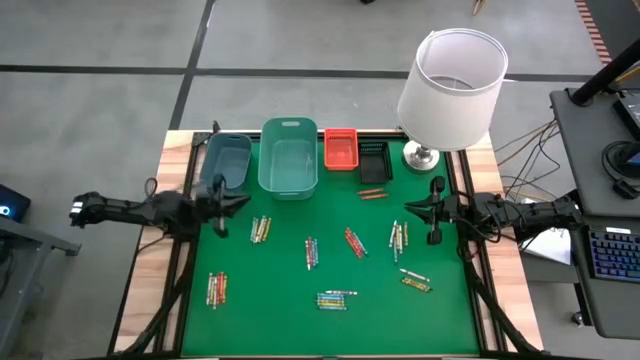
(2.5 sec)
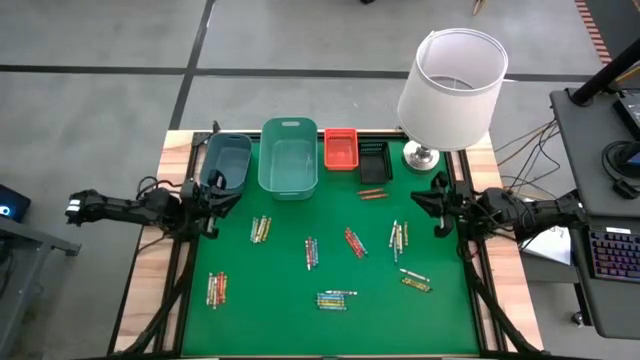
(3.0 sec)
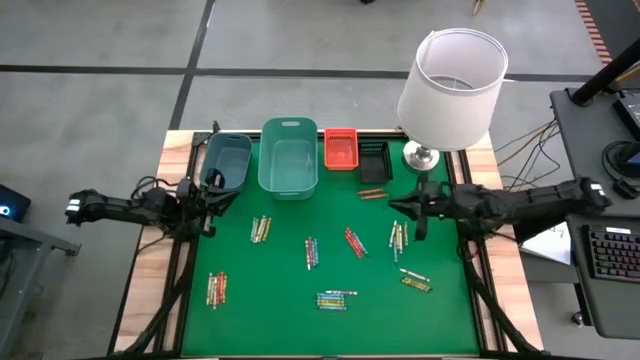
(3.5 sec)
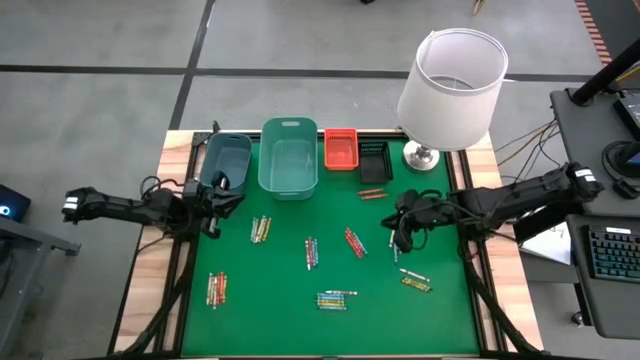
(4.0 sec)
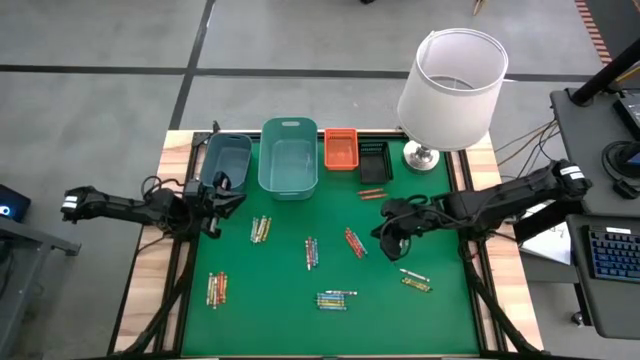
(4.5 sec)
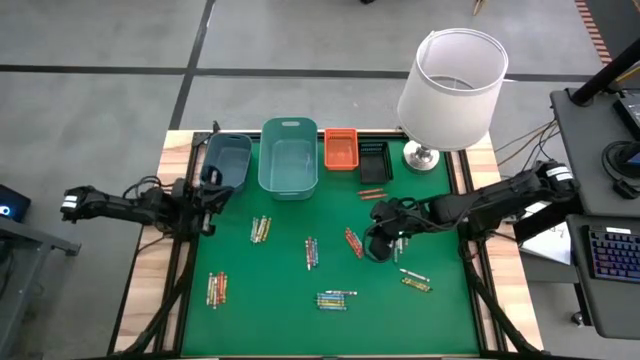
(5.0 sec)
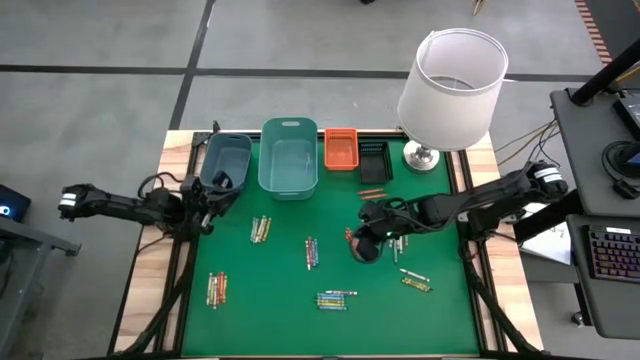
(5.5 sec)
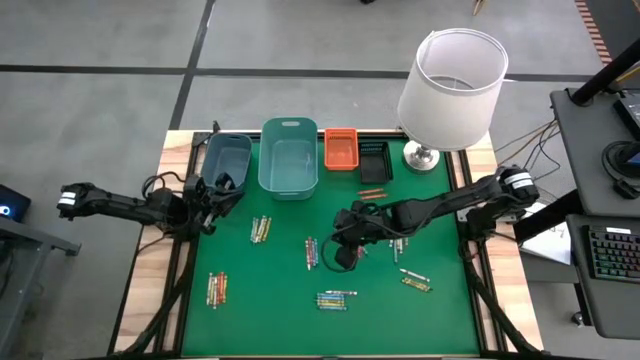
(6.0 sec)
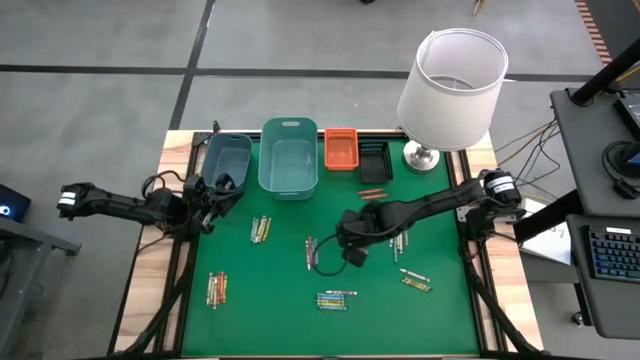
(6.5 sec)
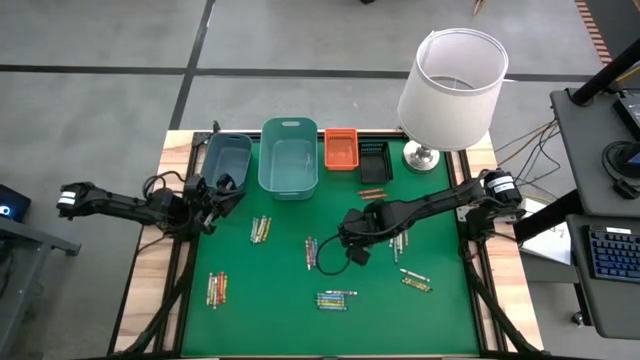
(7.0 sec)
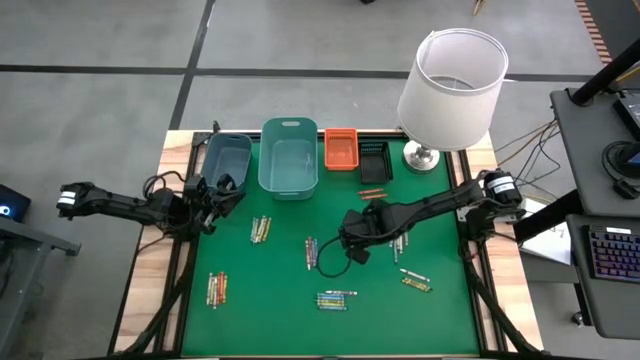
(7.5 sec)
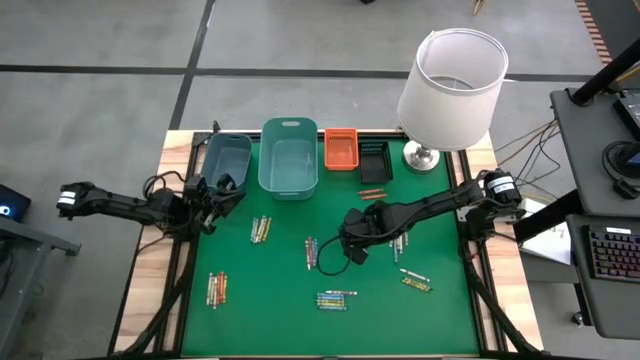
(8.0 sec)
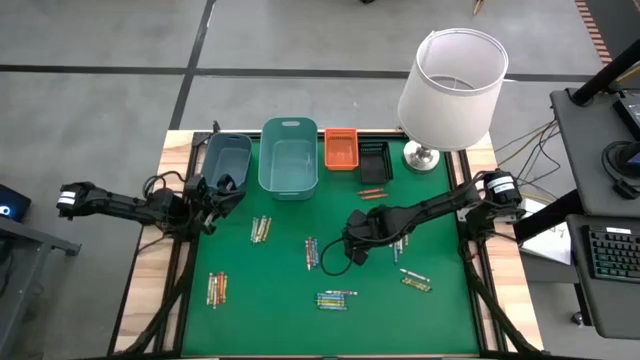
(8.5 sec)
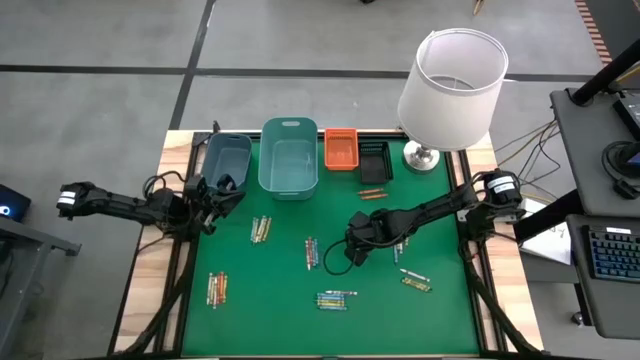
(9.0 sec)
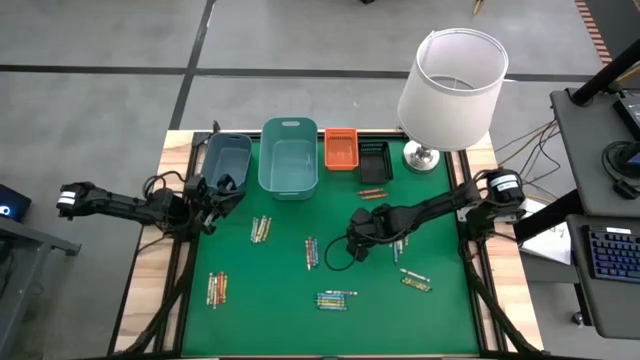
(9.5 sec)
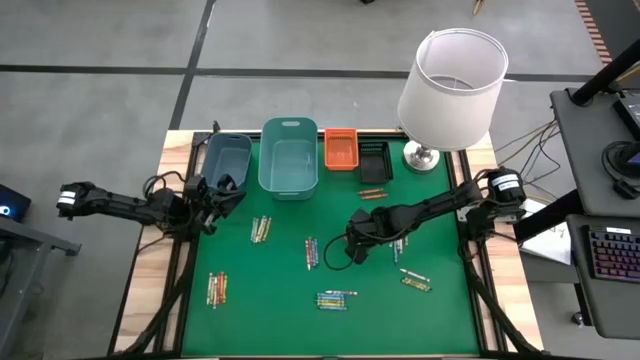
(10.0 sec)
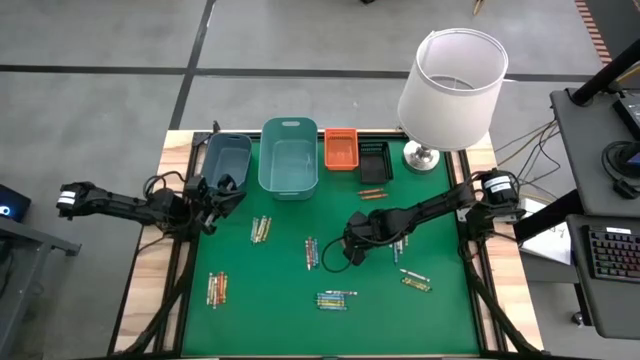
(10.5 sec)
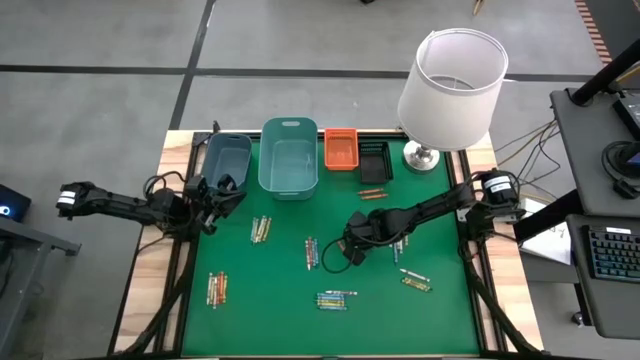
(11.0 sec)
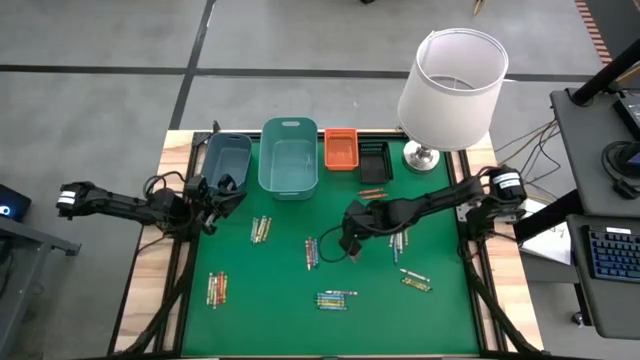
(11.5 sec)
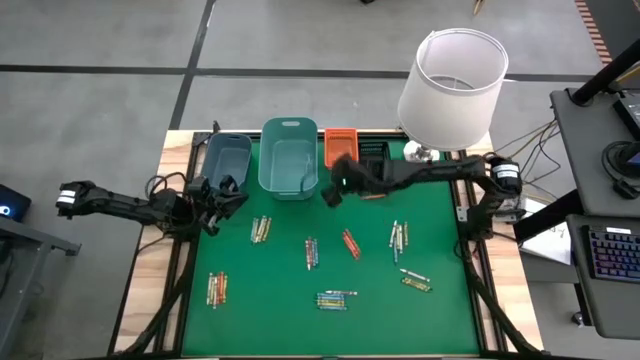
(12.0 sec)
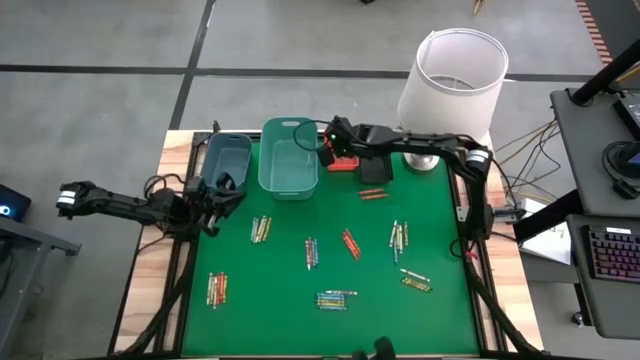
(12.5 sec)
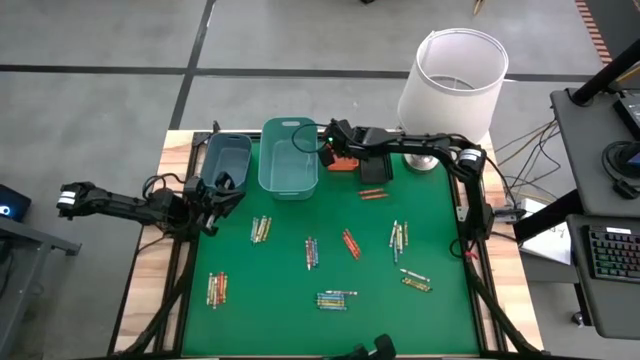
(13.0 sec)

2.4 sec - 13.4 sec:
Task: Sort crayons
Put the blue crayon into the orange bin

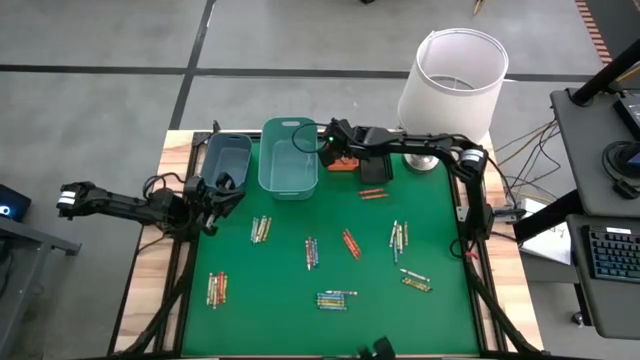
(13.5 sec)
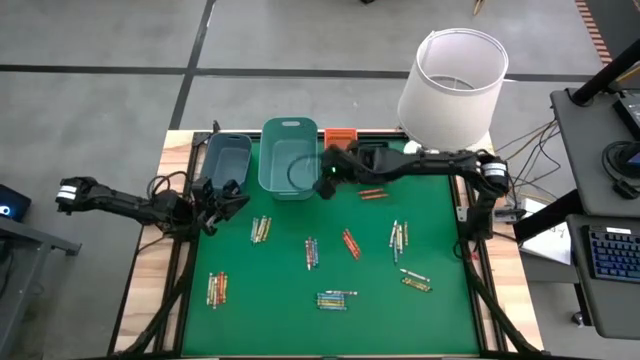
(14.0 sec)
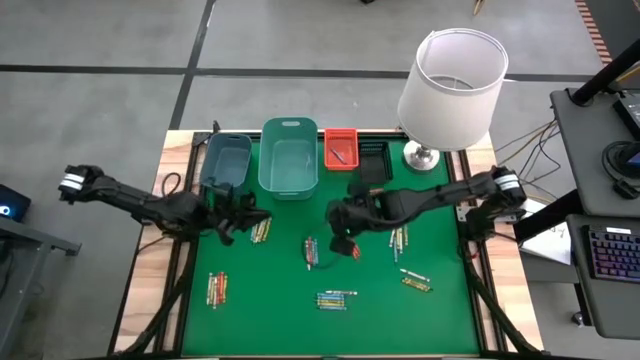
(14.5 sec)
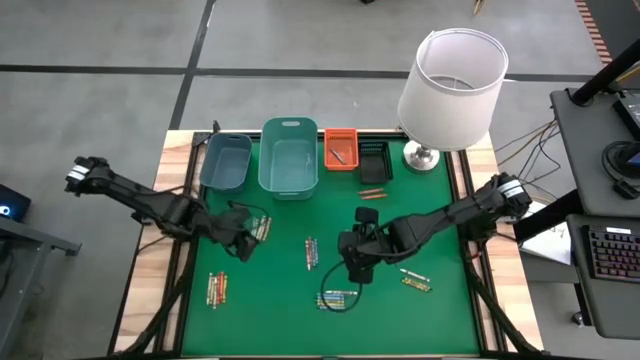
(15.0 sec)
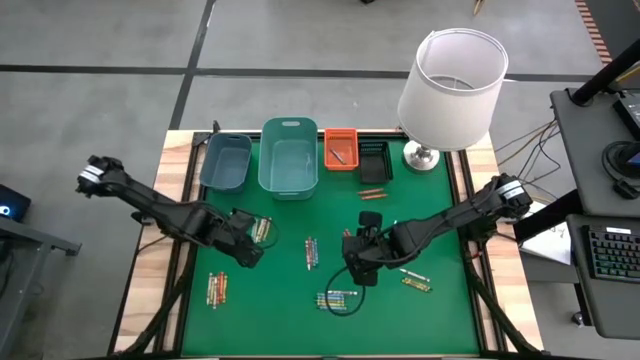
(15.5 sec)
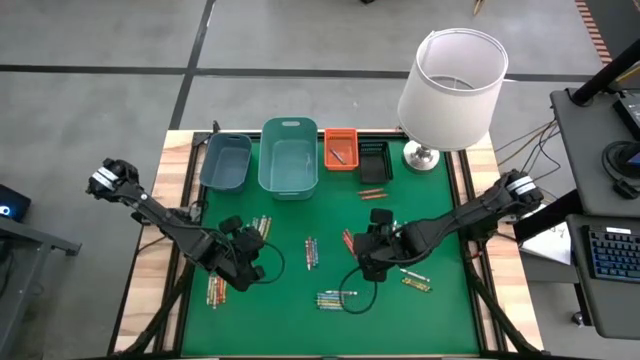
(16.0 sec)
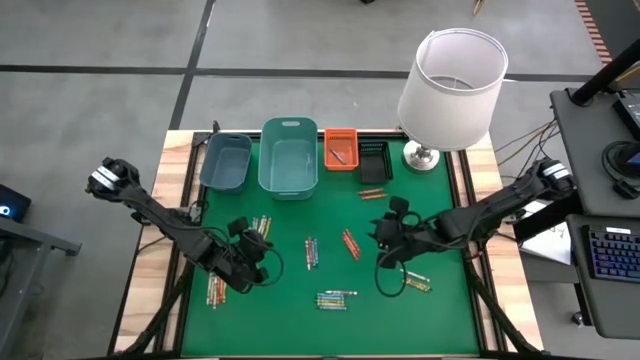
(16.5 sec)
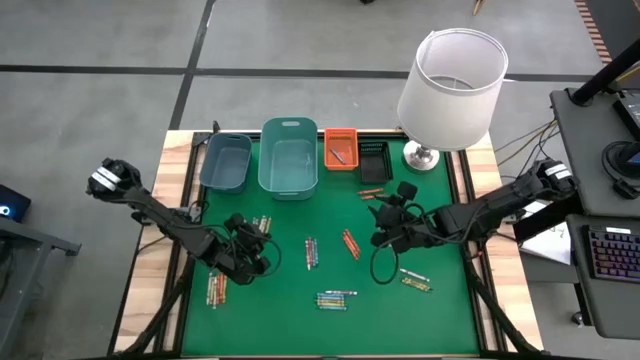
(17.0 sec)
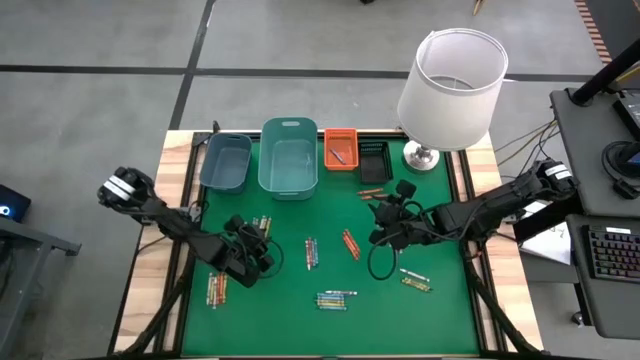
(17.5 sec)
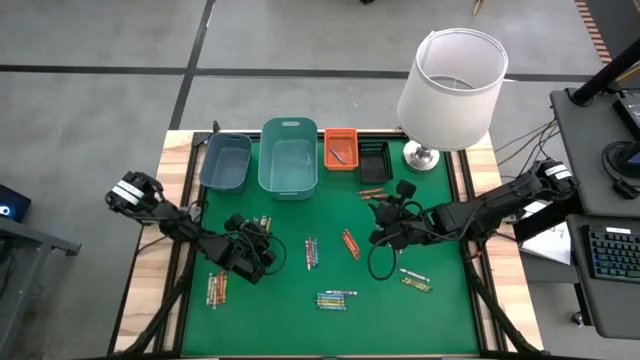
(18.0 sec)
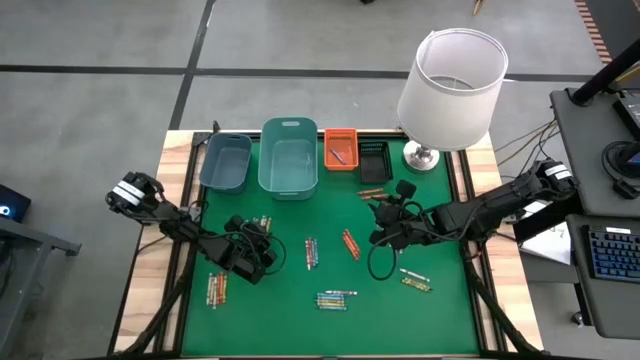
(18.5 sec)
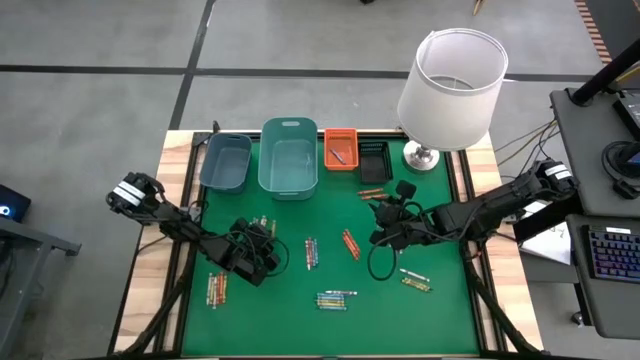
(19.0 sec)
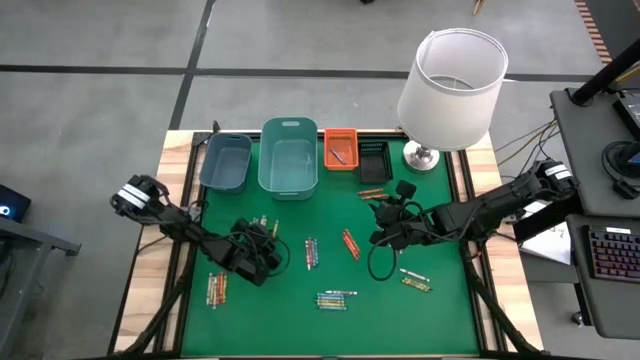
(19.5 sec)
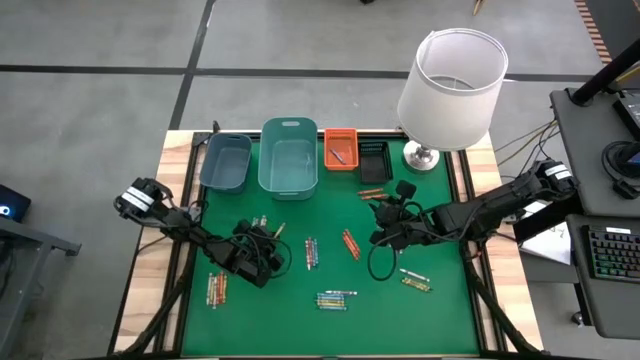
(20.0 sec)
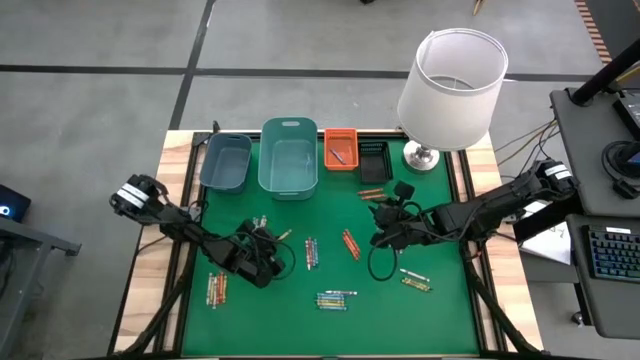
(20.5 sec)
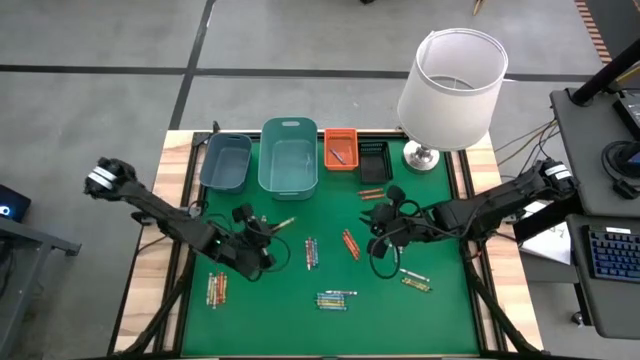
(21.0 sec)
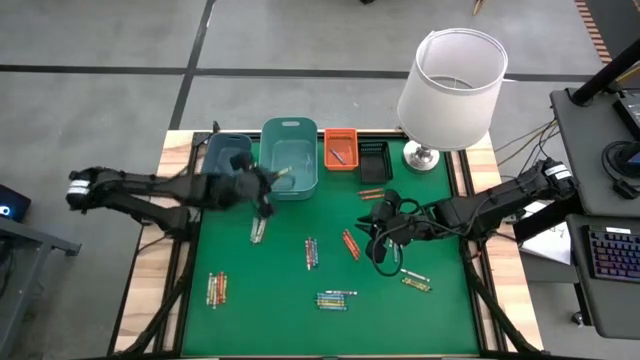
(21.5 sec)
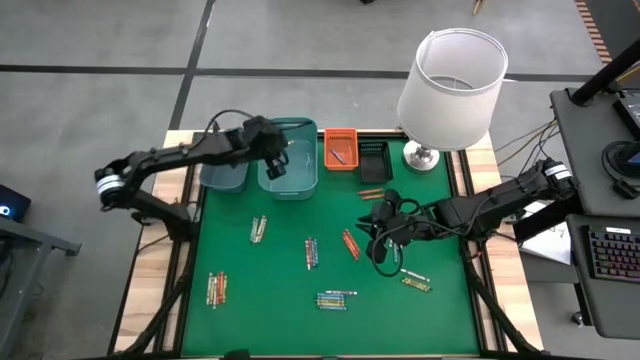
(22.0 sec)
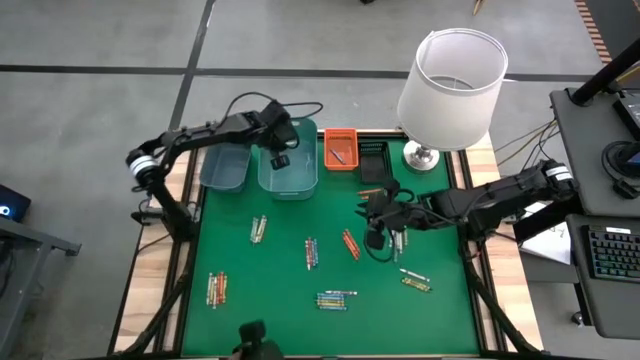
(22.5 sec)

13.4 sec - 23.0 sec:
Put the green crayon into the green bin
